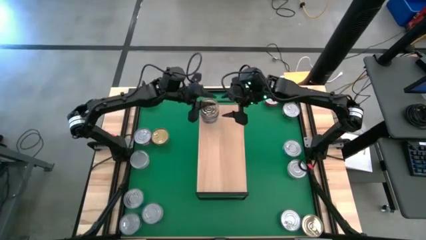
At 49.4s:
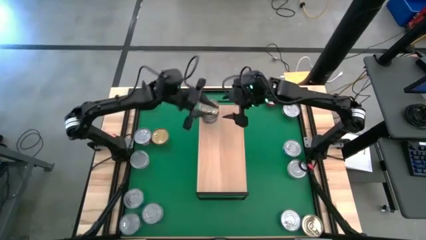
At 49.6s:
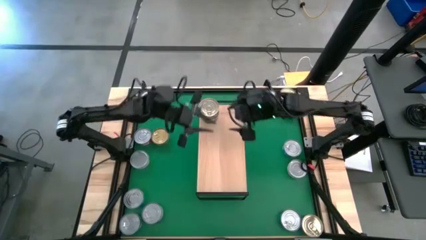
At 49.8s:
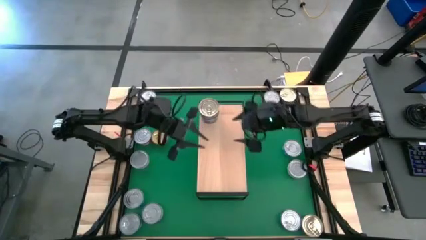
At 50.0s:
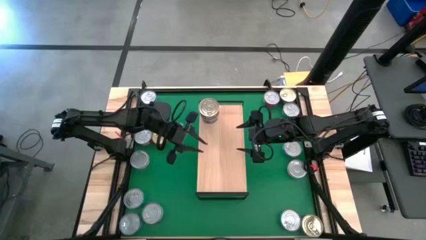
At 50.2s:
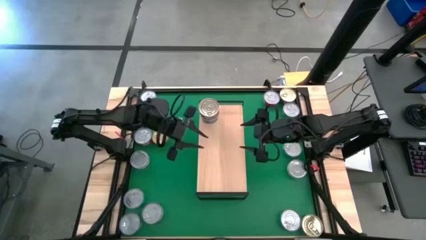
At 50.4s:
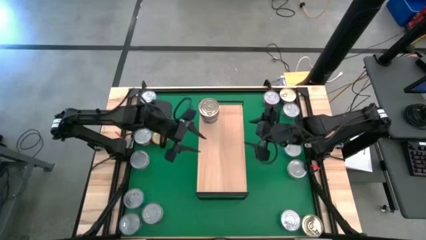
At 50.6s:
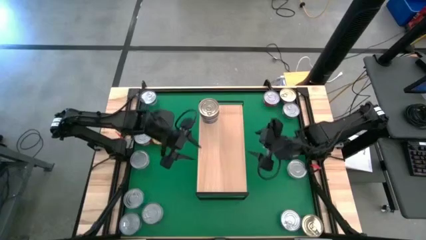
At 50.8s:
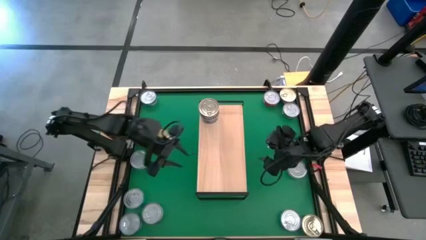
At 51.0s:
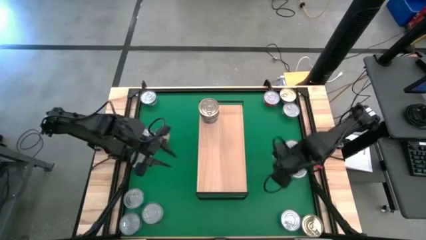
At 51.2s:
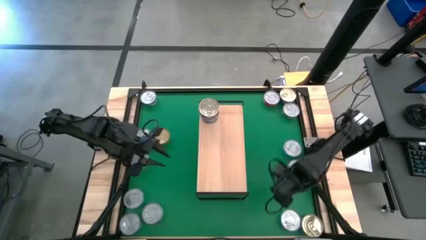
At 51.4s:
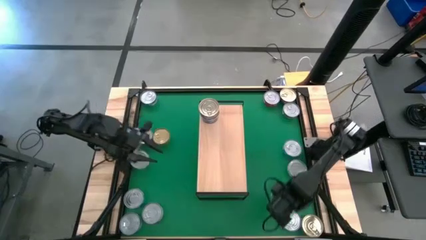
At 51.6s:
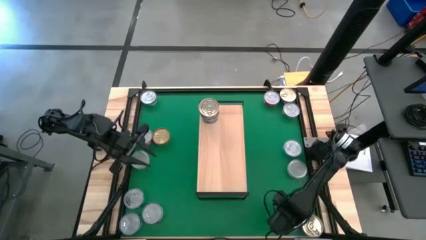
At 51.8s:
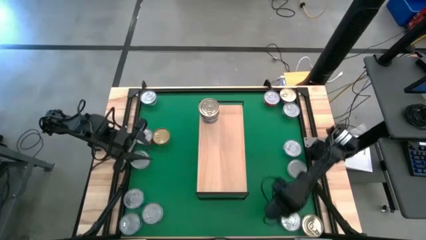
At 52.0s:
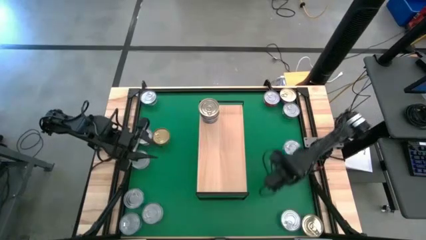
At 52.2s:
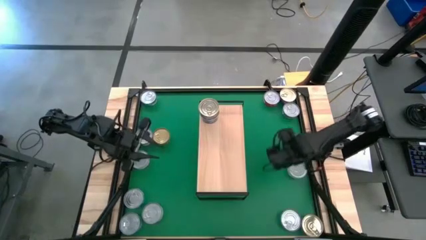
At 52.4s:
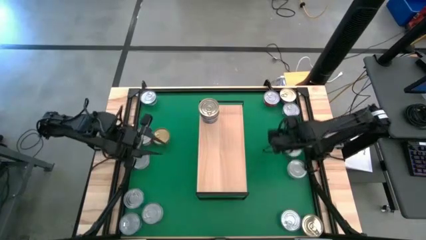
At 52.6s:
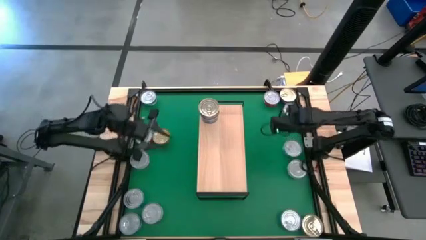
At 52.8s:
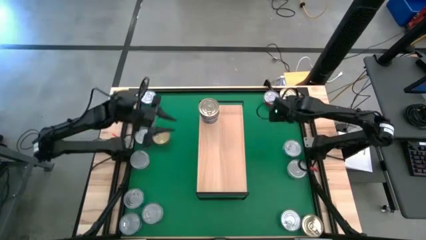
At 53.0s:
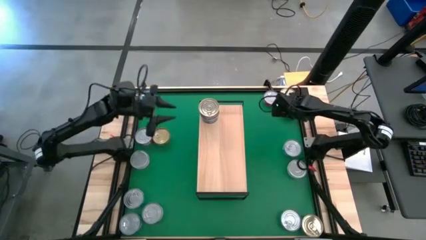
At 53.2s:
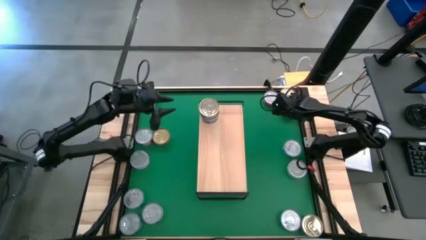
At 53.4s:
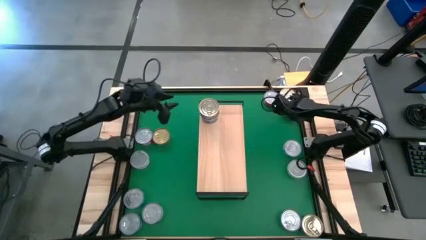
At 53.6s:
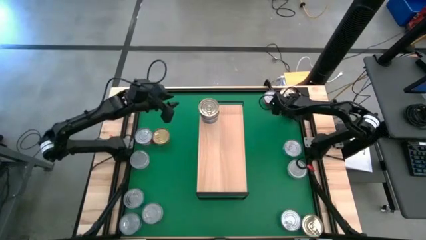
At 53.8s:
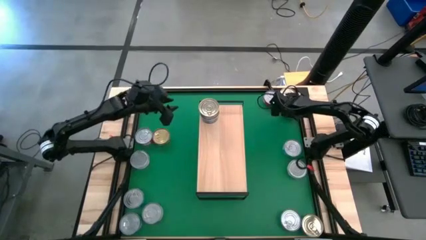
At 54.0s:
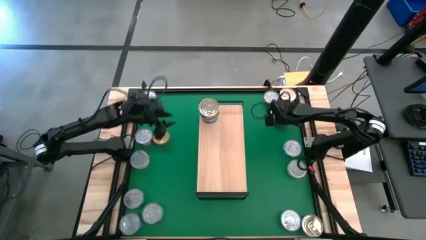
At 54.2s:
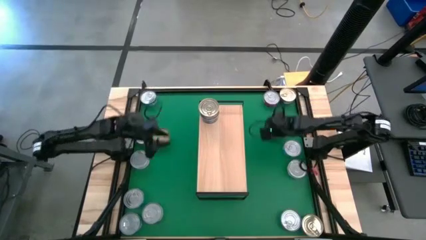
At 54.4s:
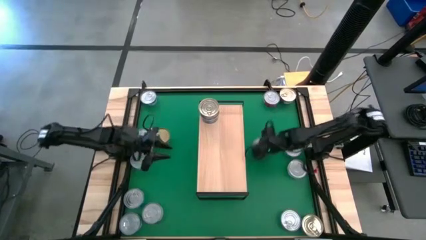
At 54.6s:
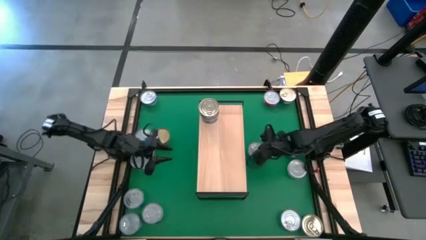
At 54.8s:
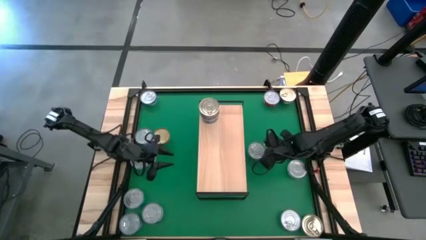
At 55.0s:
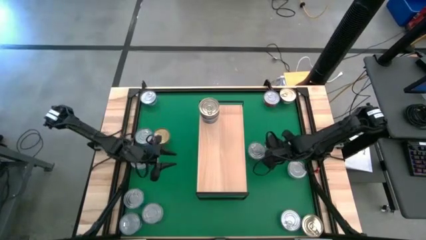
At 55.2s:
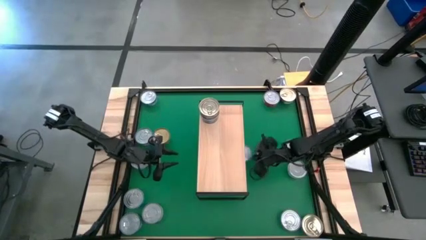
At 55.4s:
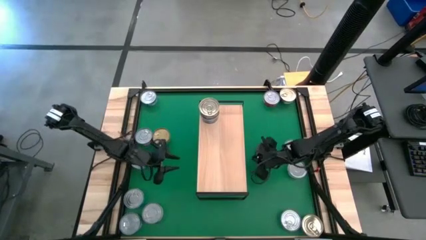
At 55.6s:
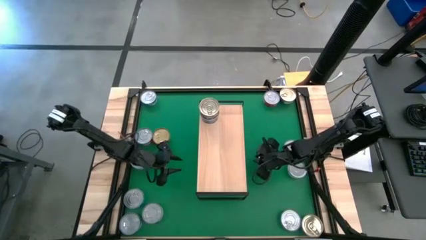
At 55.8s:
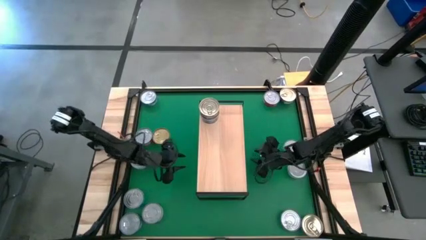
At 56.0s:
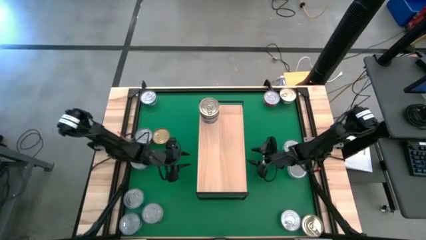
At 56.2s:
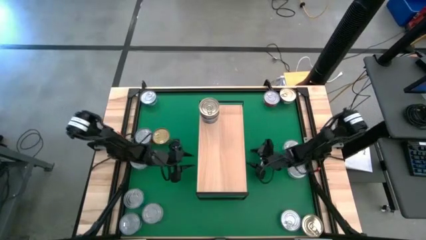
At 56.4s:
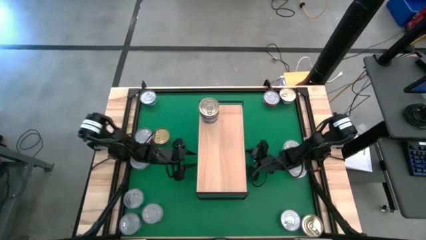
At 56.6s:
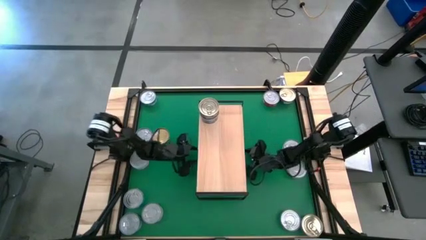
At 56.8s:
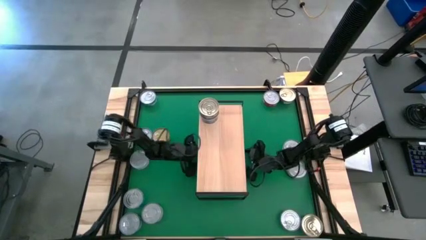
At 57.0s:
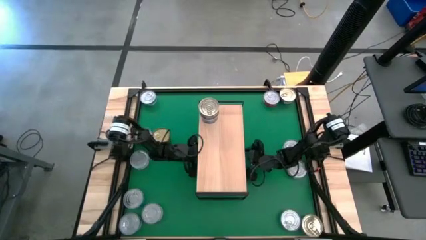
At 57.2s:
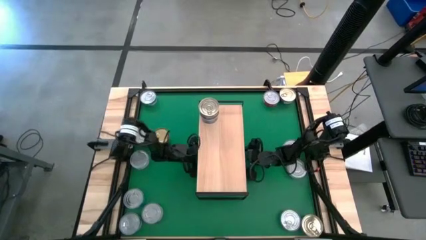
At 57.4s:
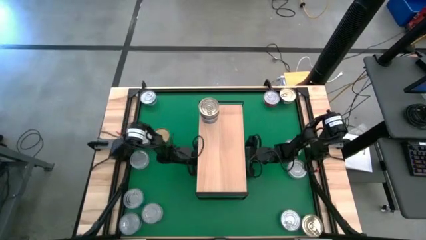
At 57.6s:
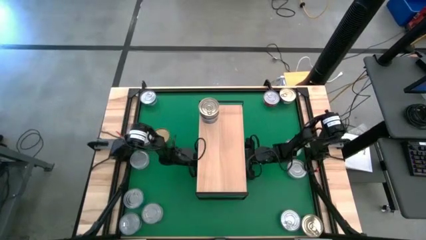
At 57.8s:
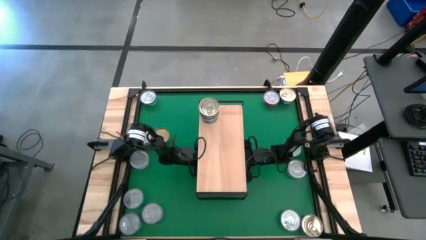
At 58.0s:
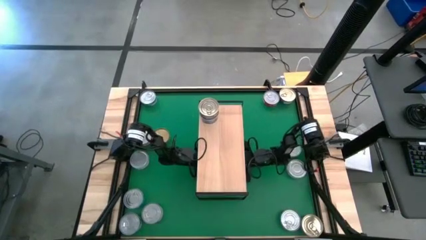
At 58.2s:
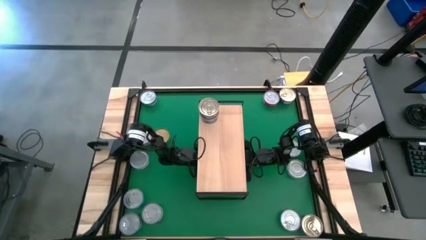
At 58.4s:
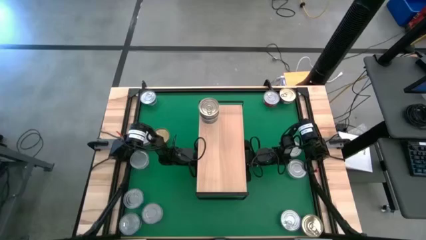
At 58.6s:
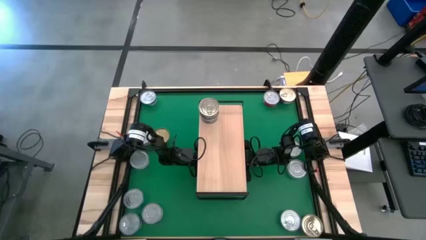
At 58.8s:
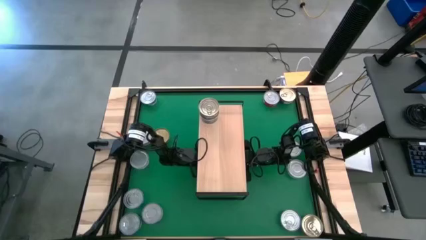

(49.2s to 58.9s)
Task: Stack canned seafood by type on shelf
Put the green tuna can on the shelf

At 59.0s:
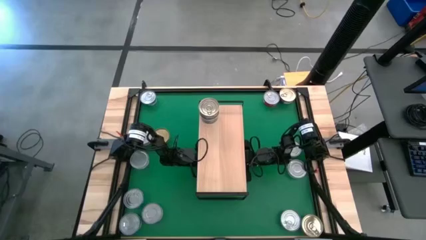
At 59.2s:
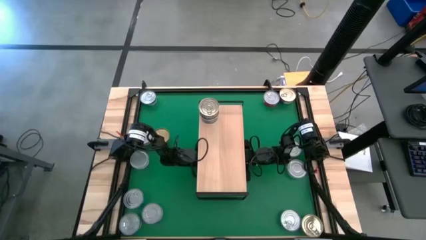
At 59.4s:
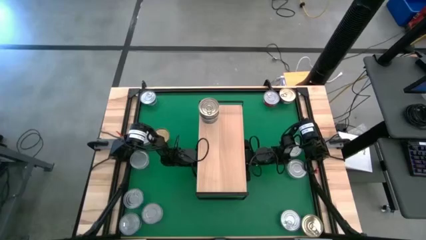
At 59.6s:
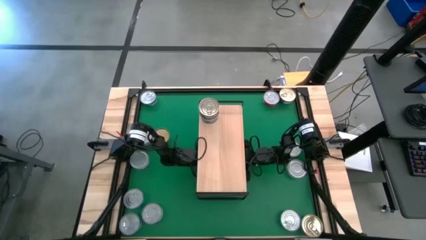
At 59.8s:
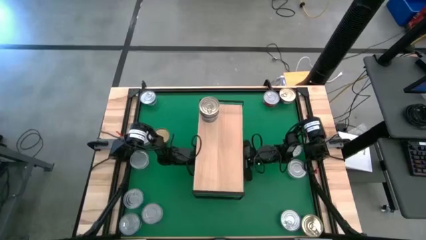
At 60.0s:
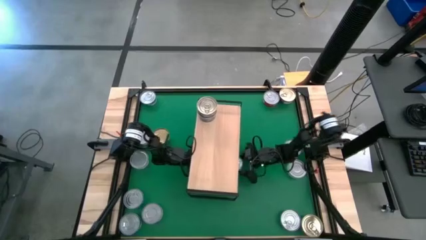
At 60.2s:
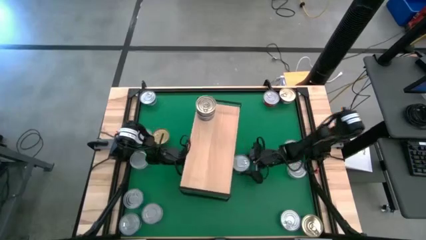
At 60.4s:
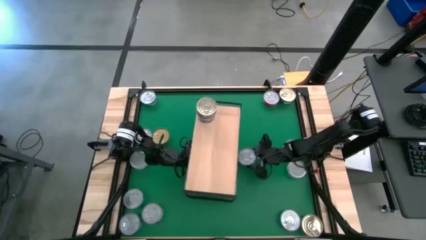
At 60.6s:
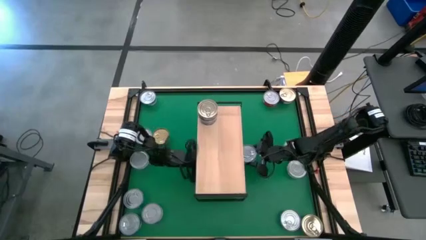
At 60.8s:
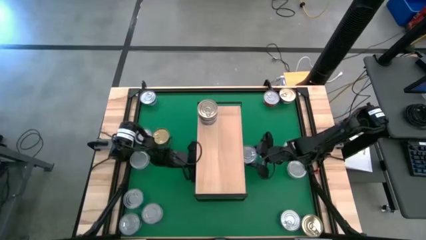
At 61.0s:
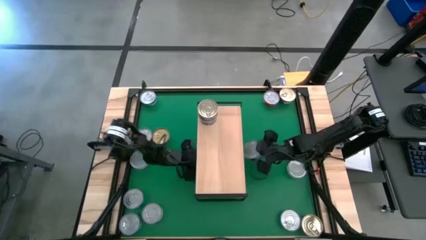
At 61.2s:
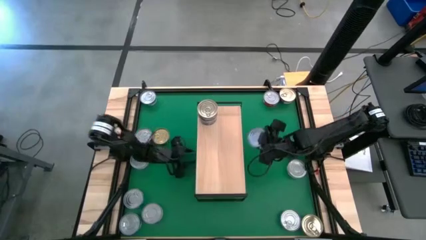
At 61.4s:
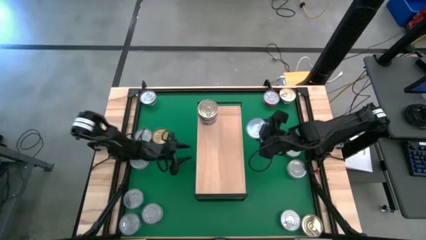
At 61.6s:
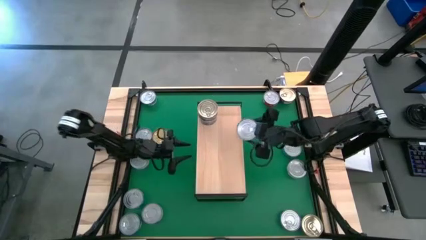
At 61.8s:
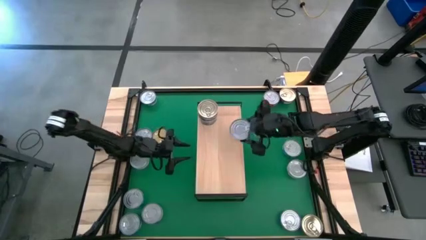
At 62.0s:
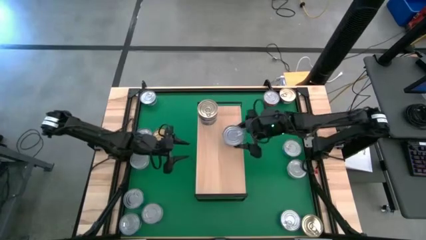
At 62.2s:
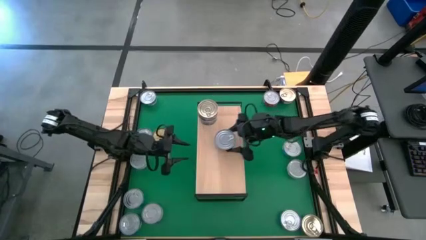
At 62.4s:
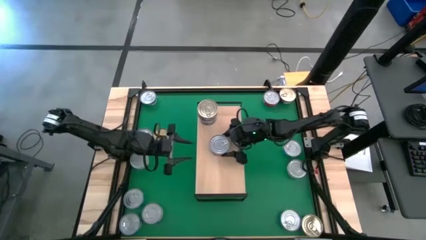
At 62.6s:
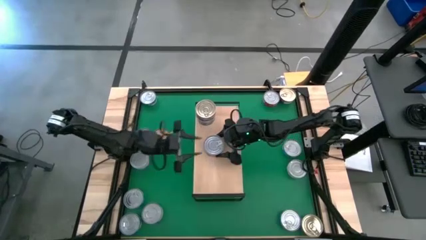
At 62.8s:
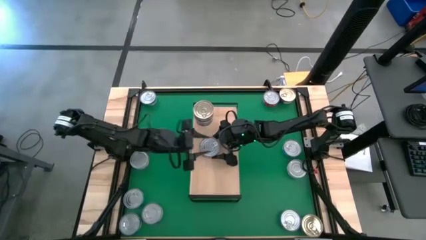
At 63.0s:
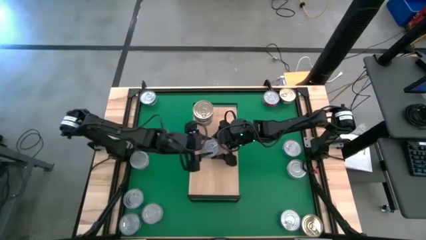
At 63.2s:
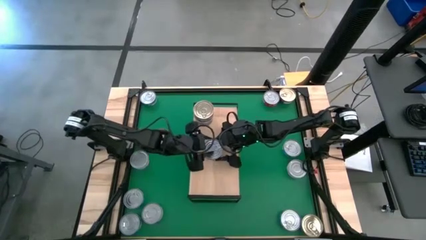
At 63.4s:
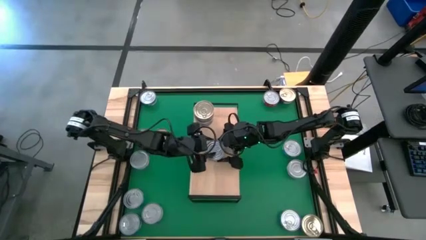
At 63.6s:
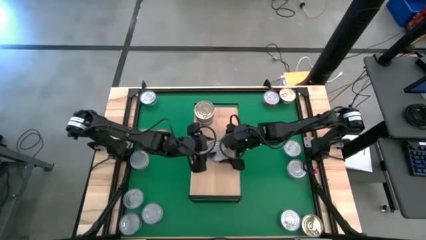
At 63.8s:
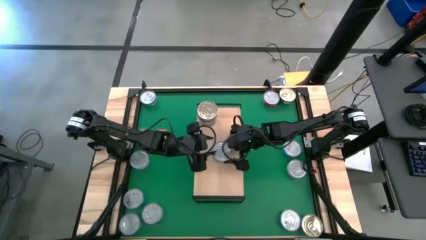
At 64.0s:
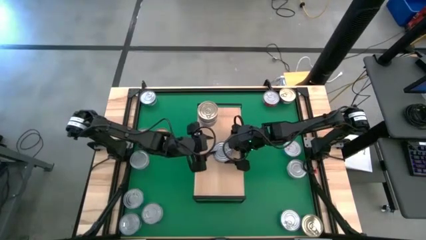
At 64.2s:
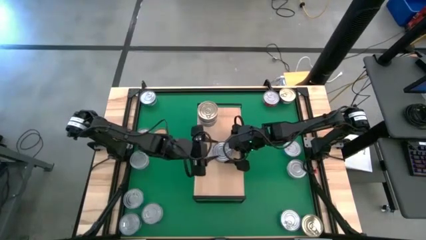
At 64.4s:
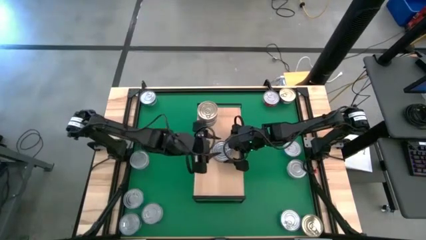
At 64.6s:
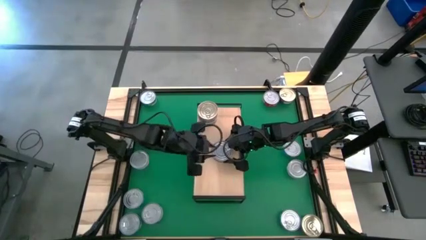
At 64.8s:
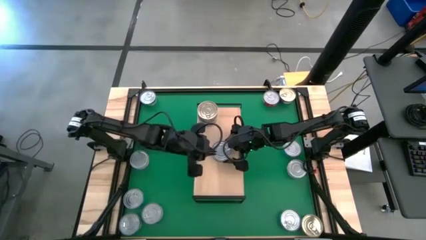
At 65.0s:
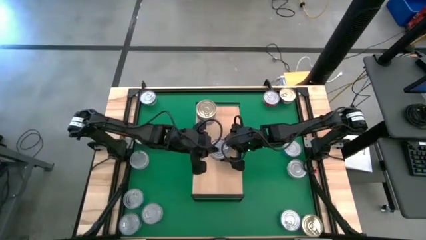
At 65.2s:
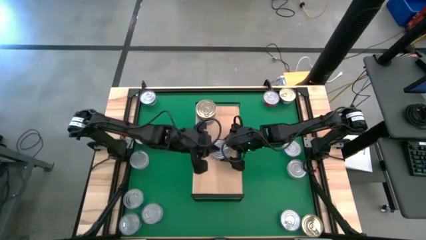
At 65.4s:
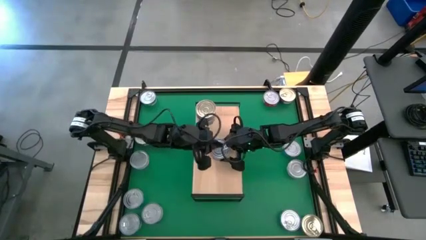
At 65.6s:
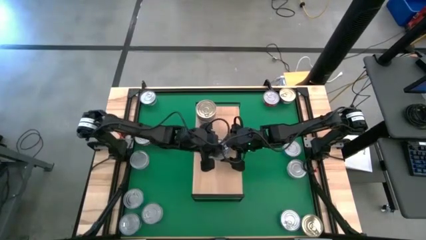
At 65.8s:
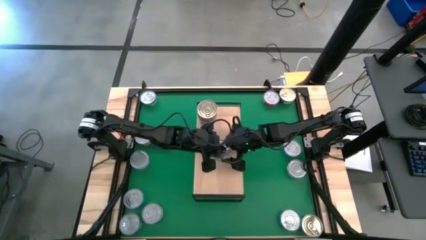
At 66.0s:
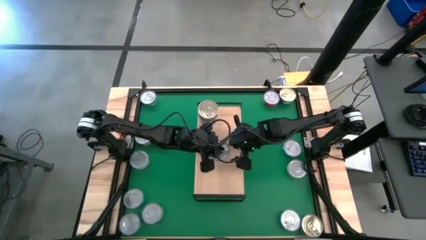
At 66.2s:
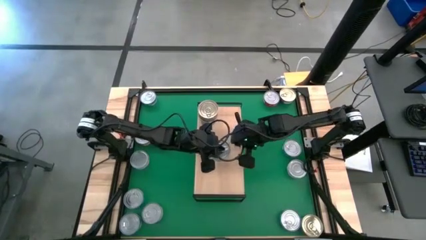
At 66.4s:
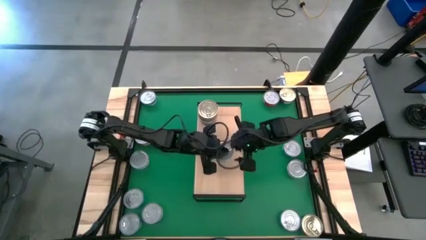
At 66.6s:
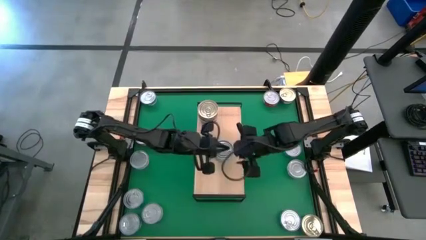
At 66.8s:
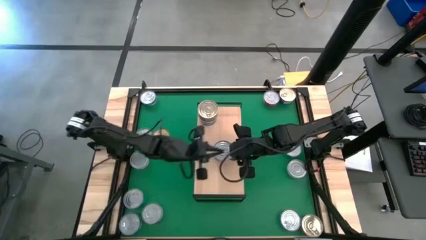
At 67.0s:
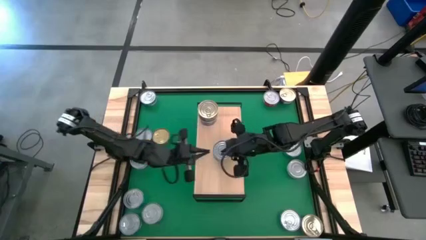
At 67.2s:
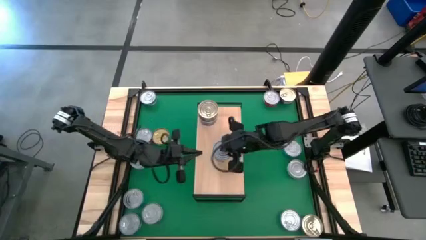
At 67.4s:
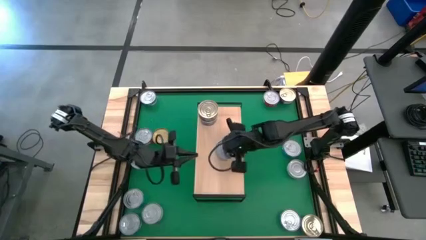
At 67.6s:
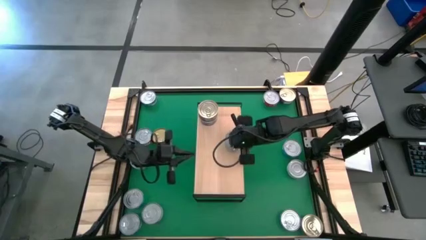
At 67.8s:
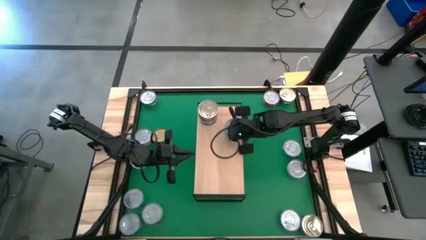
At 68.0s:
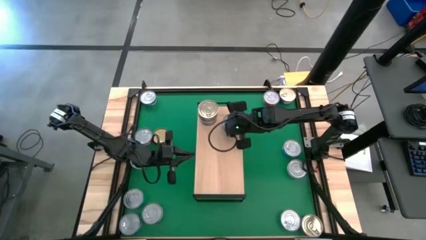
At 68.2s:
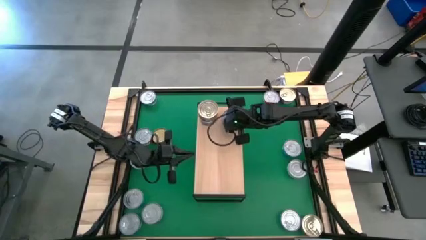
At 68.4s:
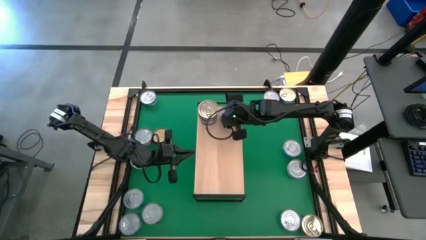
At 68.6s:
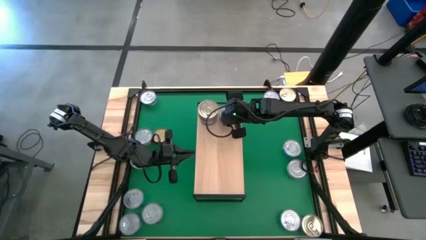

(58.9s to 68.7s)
Put the green tuna can on the shelf
